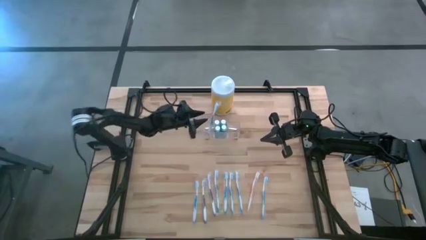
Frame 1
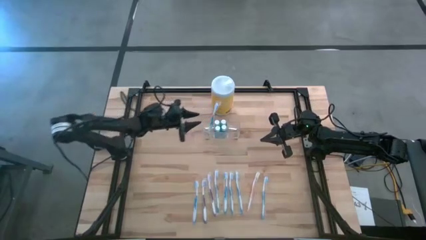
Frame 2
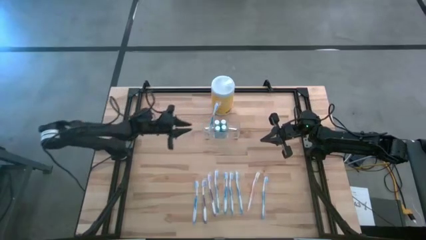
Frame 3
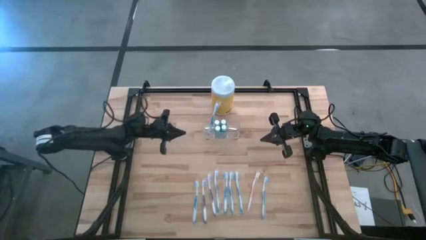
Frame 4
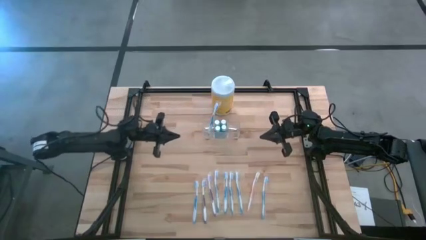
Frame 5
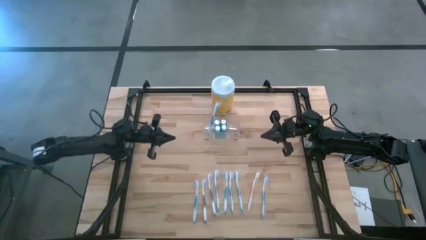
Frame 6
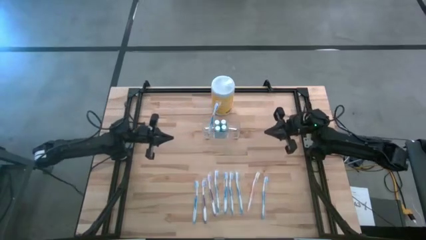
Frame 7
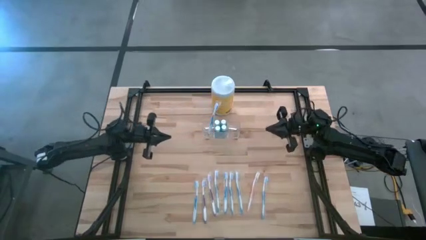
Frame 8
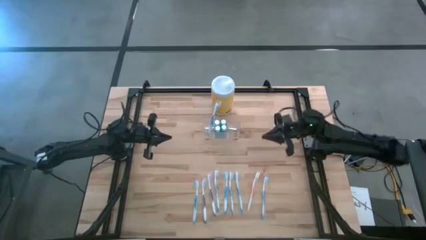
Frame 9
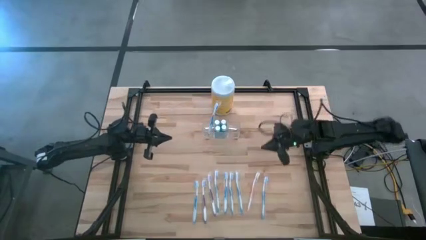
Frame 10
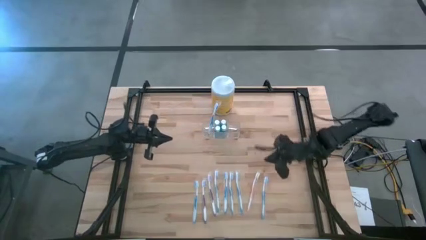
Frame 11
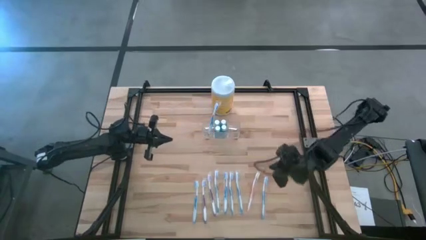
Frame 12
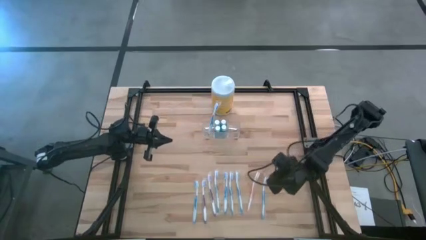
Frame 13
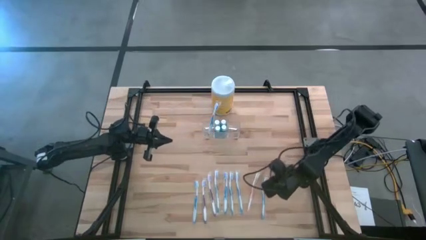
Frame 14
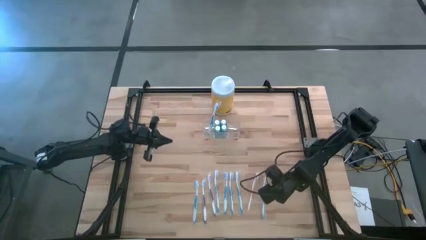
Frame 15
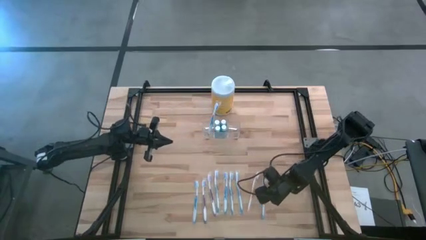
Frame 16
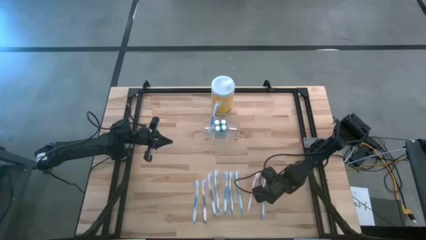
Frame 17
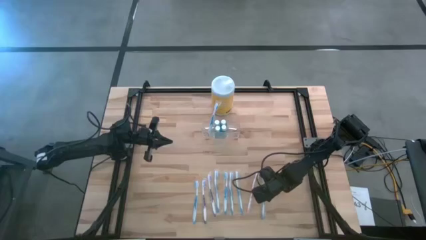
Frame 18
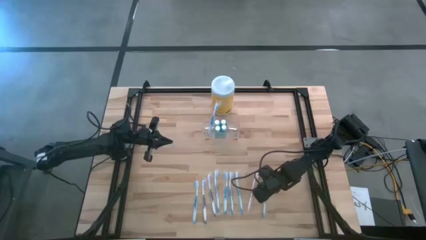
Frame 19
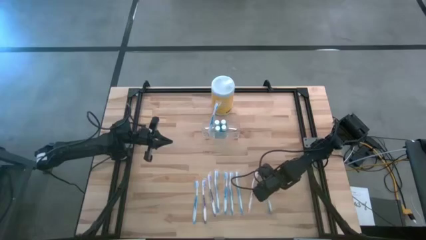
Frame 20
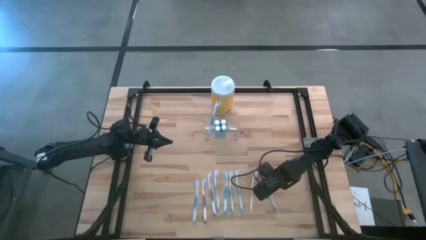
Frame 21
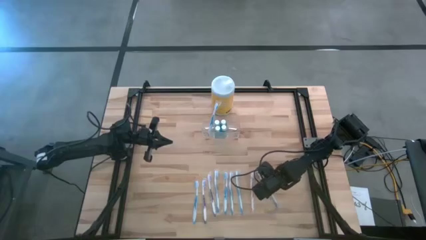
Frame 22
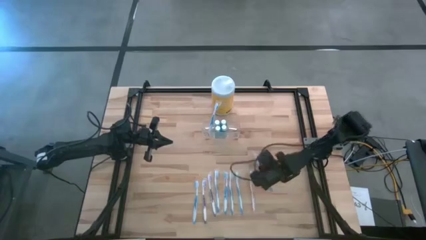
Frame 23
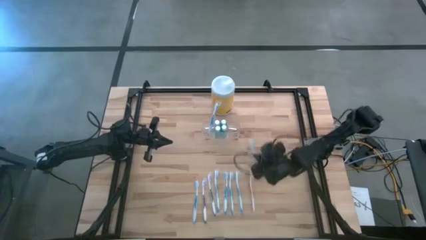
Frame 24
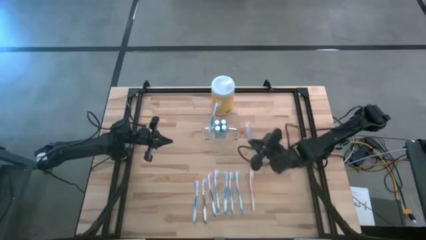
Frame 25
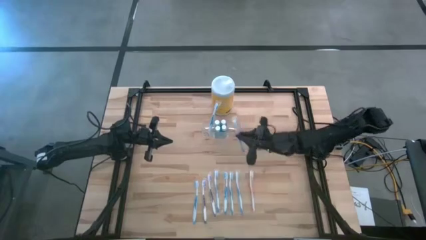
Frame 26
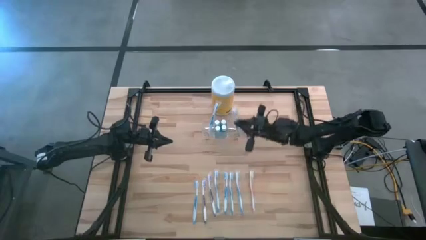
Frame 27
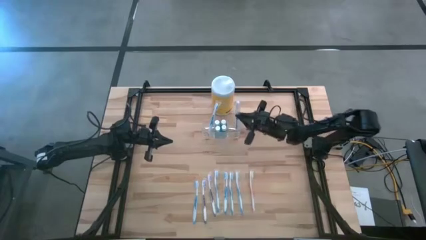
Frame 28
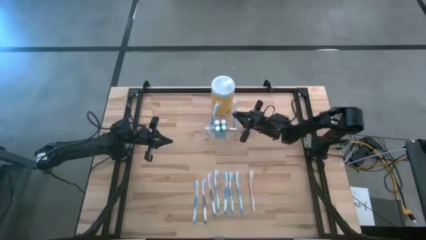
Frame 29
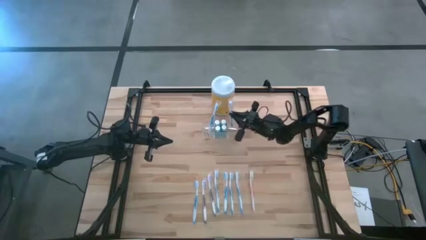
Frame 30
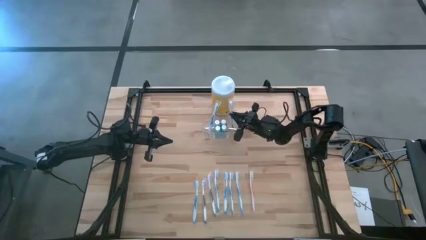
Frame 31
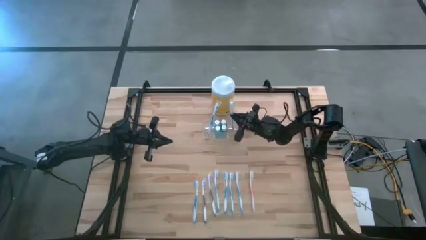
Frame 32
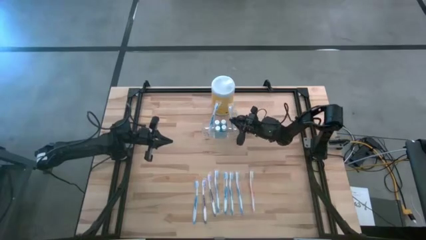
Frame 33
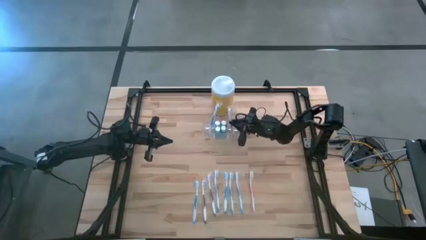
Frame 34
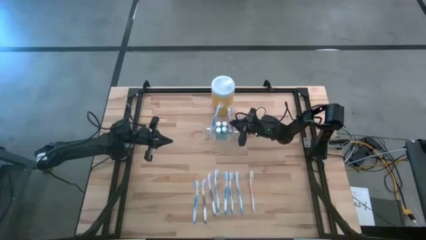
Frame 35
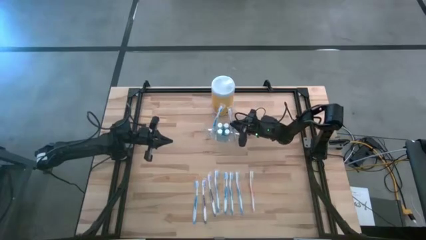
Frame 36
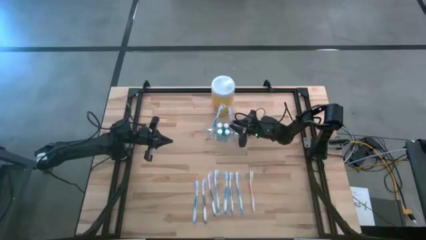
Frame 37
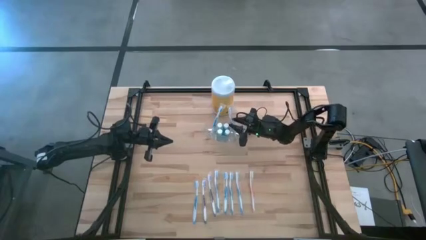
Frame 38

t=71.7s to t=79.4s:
Task: Pick & Place toothbrushing station
Put the blue toothbrush into the transparent organizer

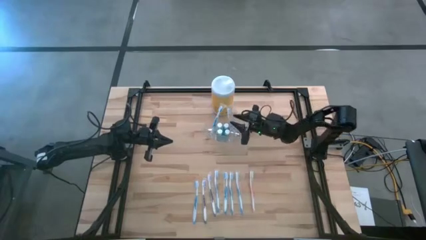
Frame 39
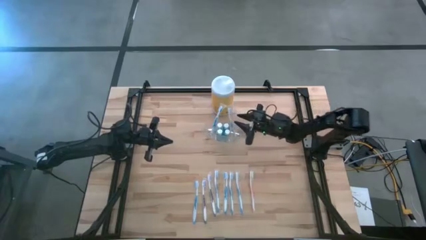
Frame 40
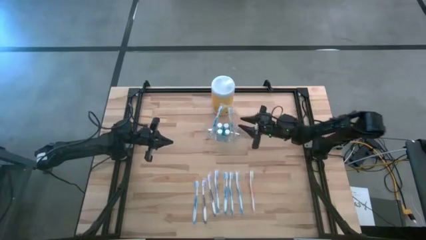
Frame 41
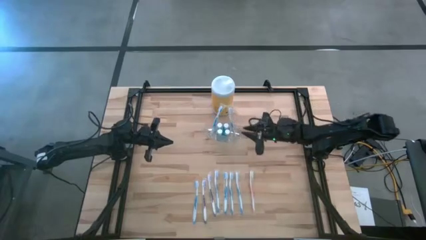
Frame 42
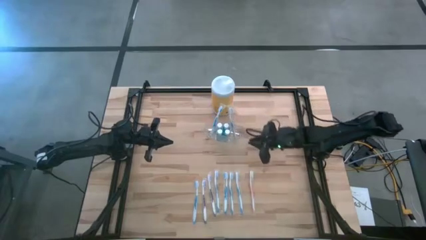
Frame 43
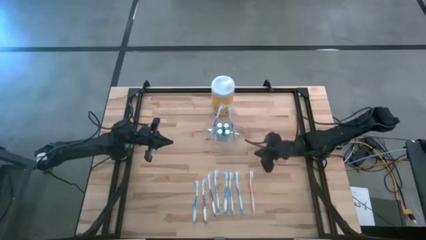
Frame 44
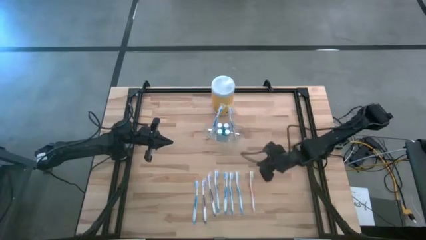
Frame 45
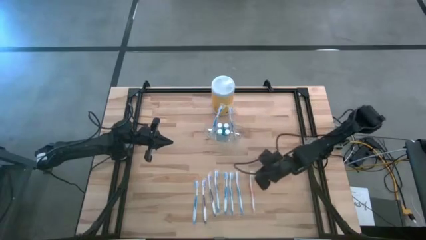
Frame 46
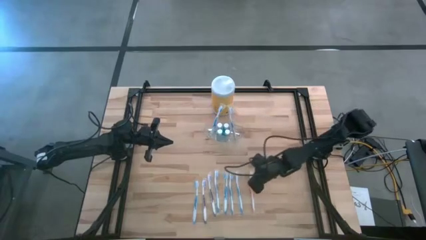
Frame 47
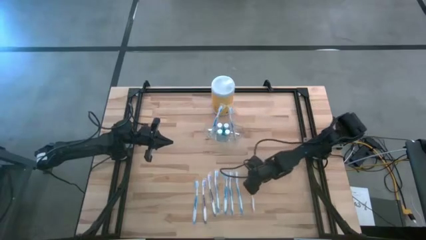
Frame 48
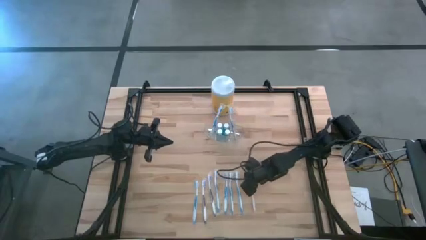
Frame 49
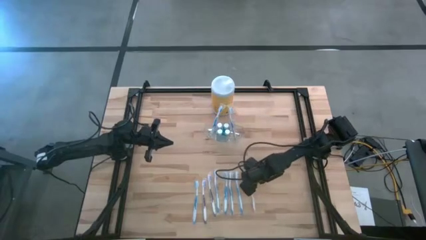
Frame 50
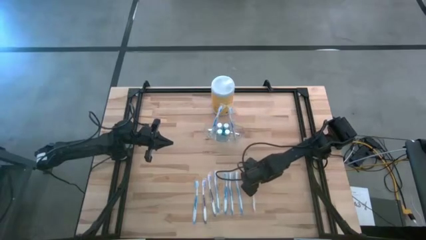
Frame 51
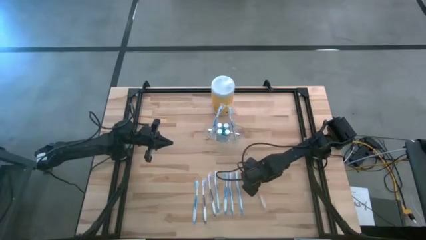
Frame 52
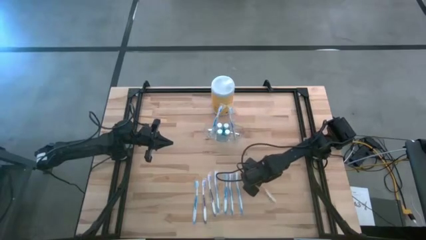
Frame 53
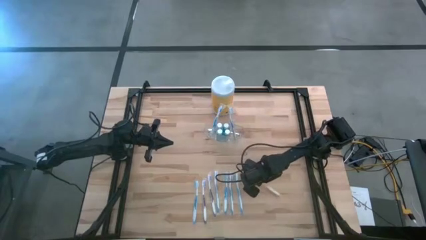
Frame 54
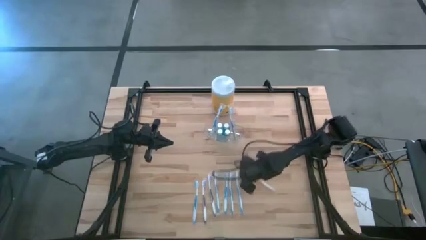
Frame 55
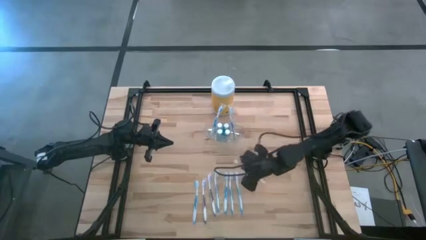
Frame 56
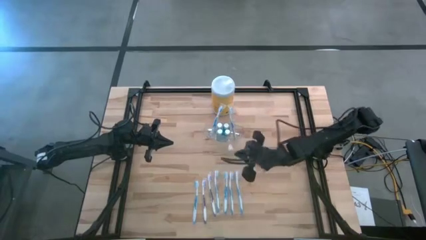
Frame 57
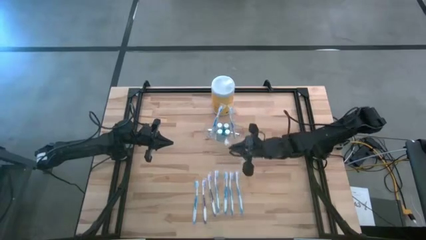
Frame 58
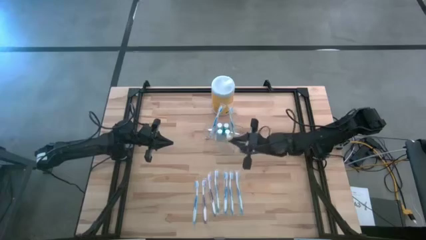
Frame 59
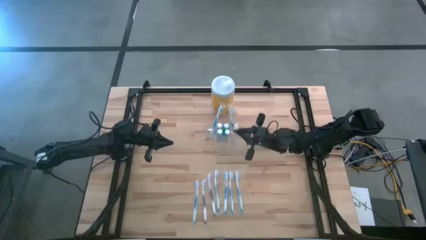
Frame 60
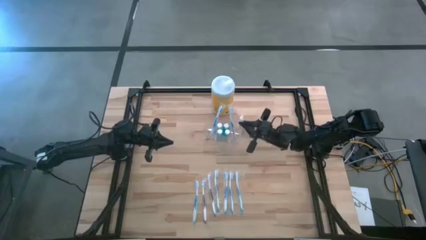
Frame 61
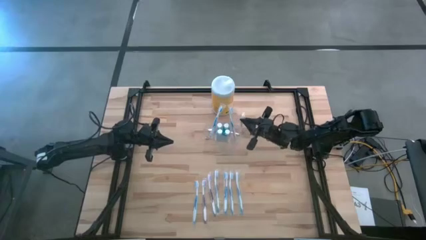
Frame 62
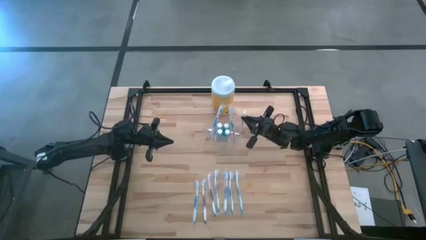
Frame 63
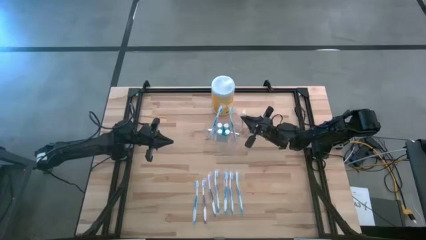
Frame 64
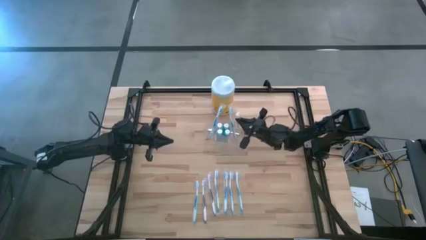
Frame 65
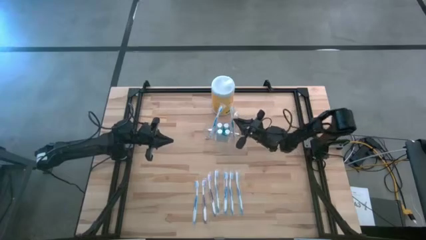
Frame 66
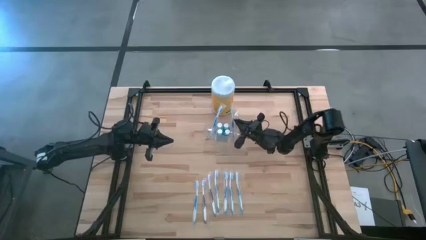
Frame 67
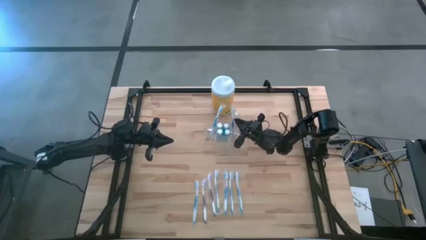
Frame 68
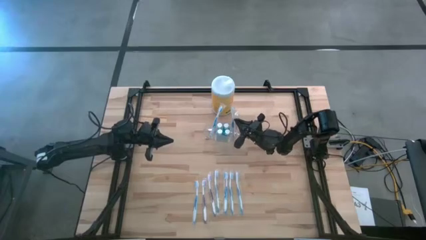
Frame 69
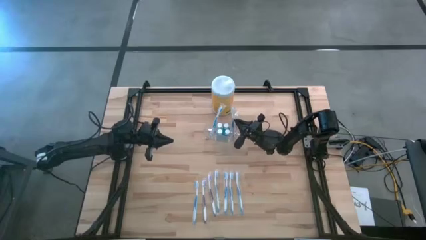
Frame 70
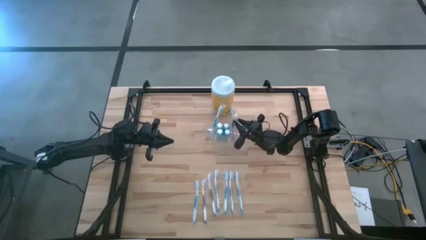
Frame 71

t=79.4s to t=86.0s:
Put the orange toothbrush into the transparent organizer

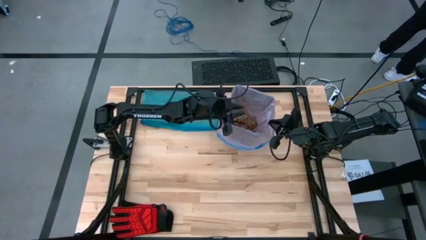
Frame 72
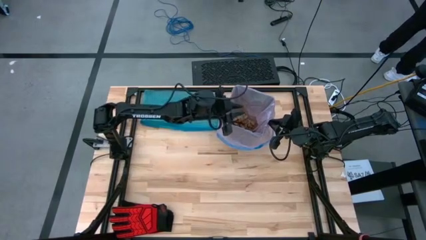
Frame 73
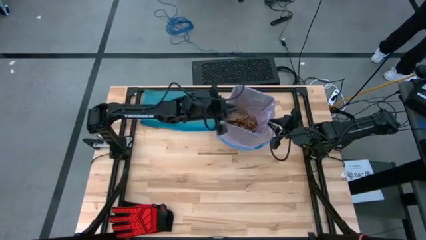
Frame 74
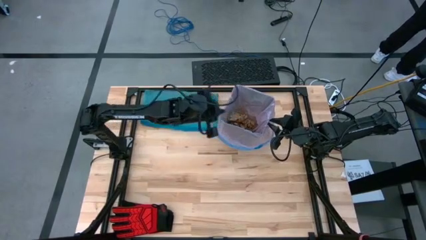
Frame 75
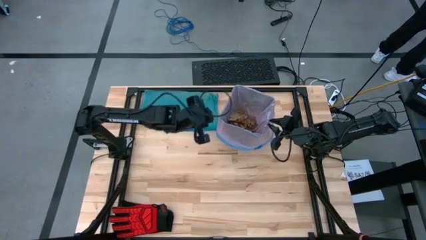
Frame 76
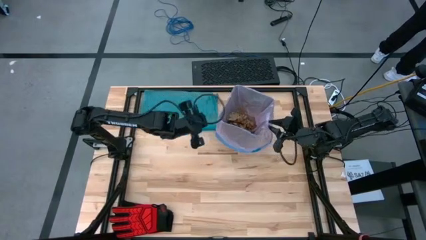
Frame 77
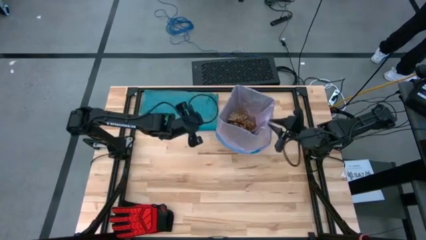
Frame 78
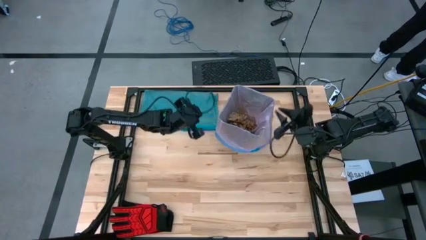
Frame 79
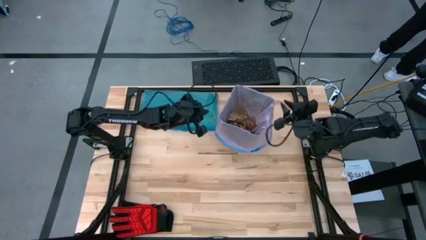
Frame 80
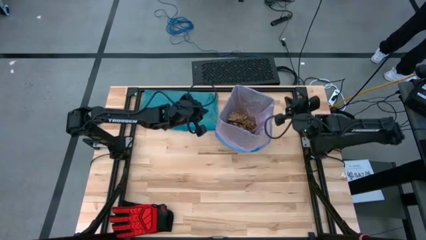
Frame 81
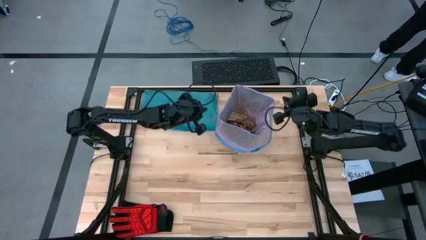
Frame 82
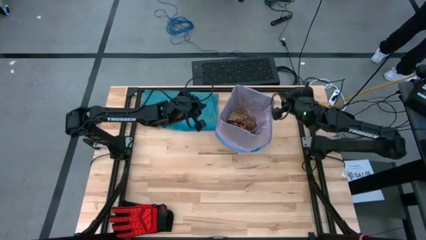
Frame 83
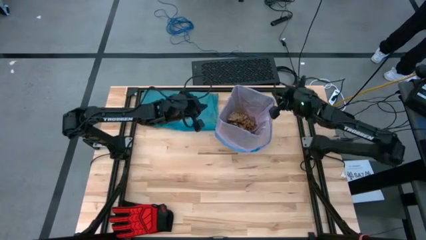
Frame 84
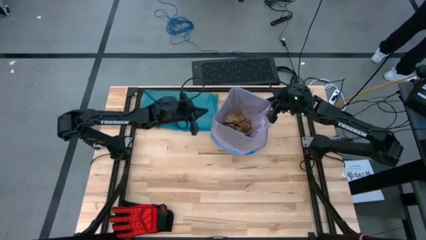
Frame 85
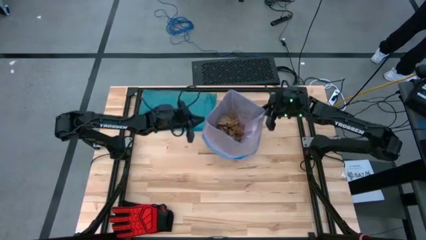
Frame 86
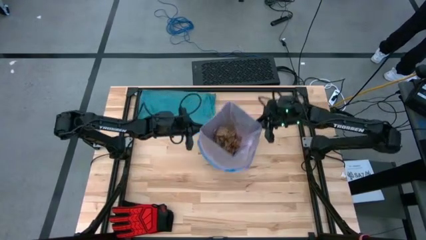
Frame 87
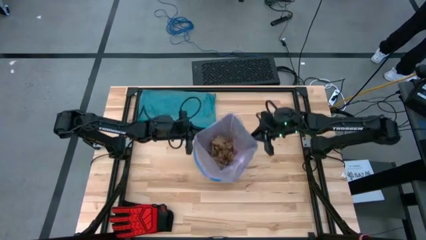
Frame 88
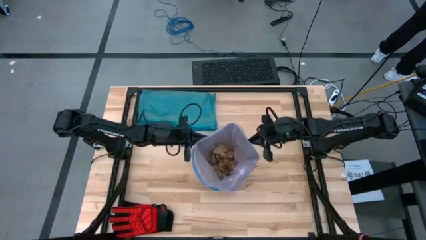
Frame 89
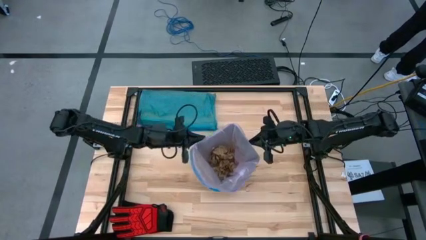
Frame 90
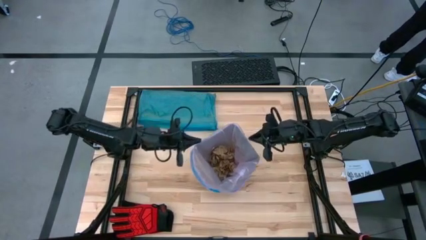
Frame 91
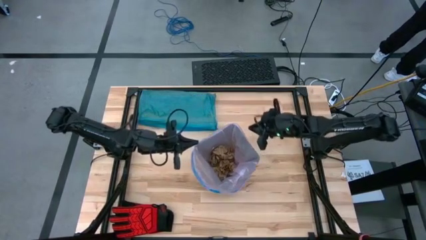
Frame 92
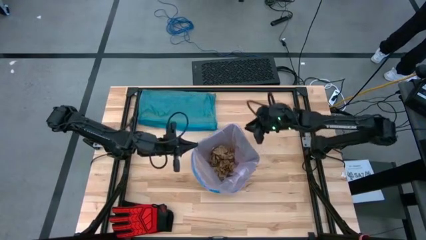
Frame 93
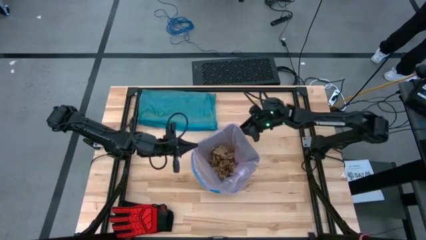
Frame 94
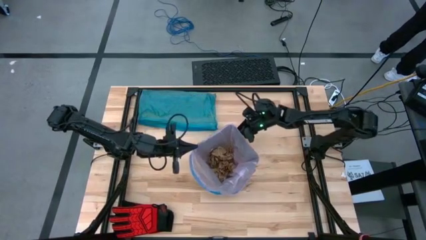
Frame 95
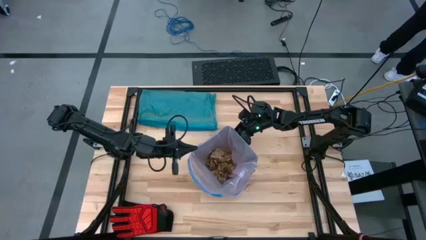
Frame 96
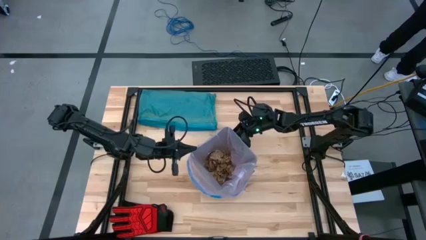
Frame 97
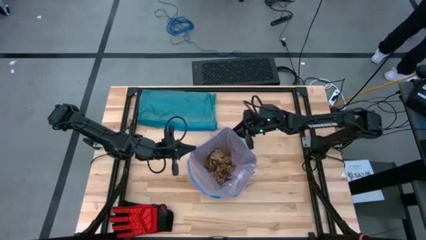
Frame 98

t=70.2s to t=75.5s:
Task: place trash/remove bag and relplace
Remove the trash bag from the trash bin and put it on the top right of the table
